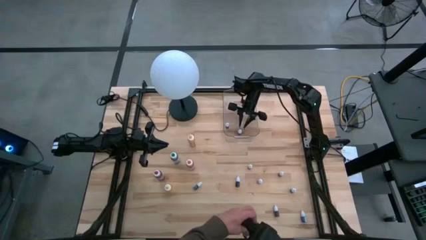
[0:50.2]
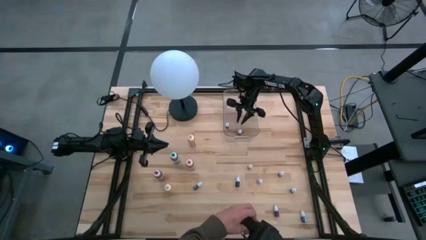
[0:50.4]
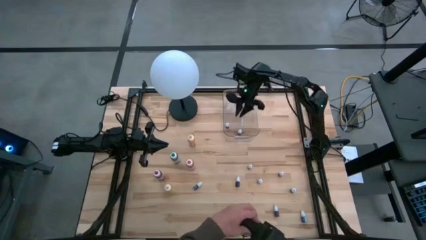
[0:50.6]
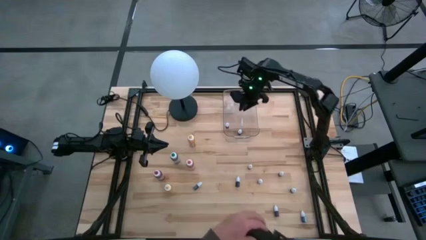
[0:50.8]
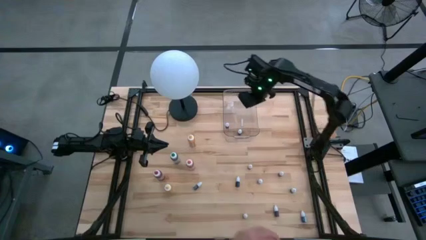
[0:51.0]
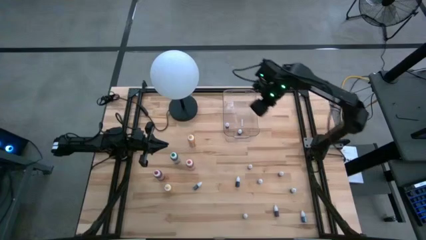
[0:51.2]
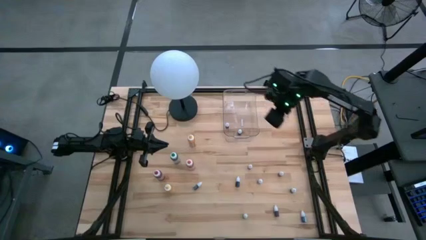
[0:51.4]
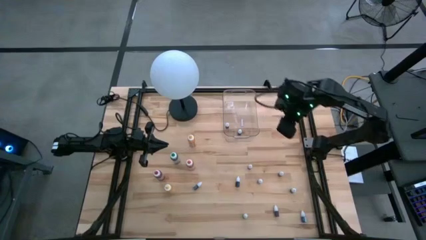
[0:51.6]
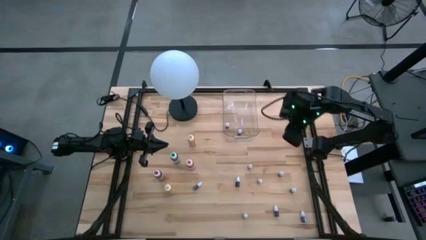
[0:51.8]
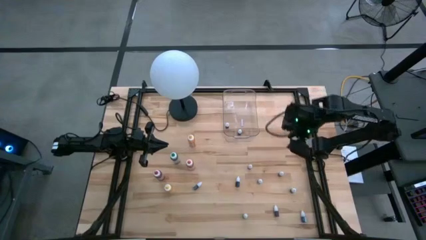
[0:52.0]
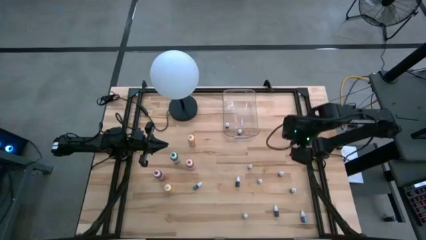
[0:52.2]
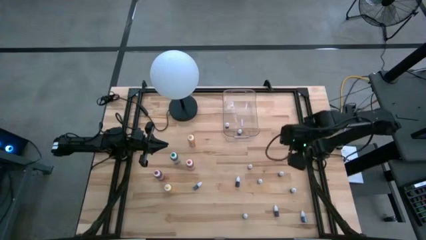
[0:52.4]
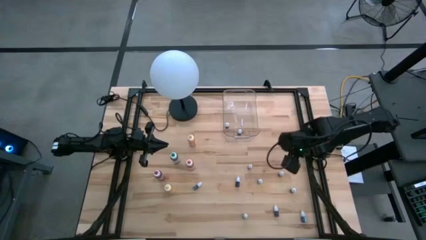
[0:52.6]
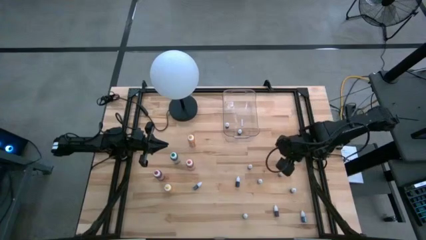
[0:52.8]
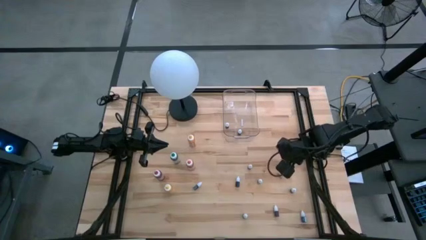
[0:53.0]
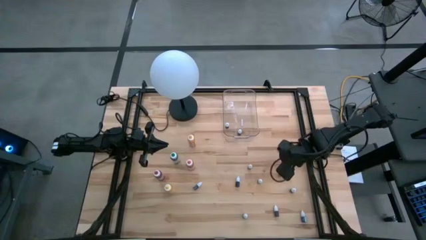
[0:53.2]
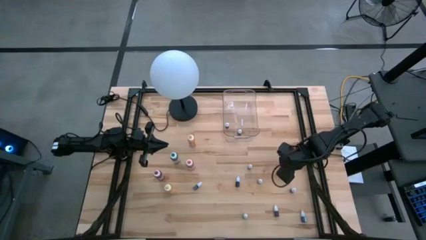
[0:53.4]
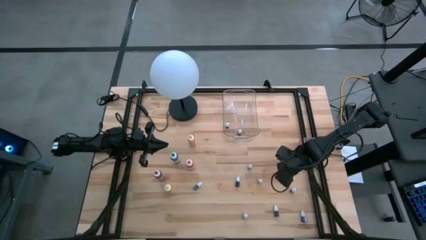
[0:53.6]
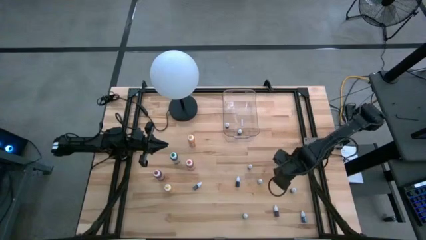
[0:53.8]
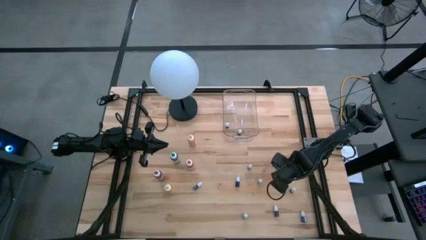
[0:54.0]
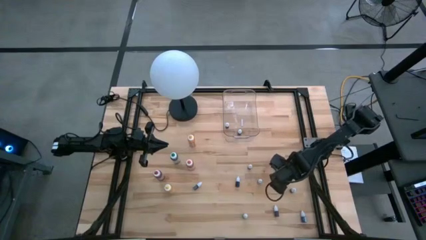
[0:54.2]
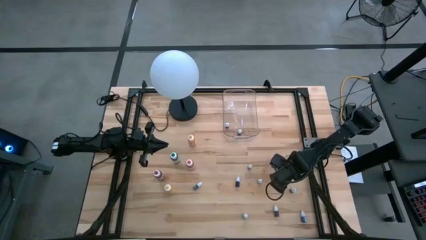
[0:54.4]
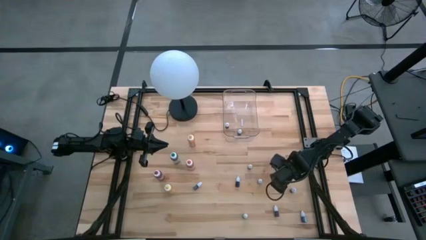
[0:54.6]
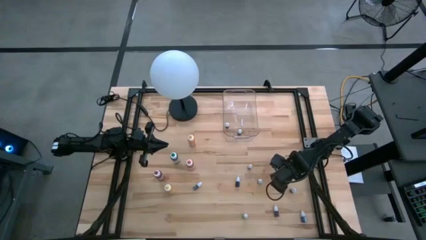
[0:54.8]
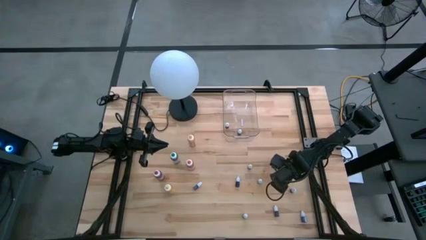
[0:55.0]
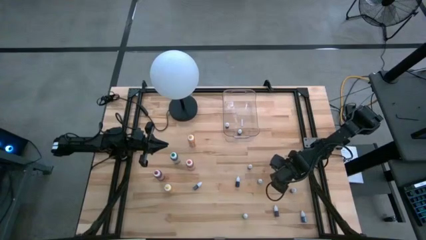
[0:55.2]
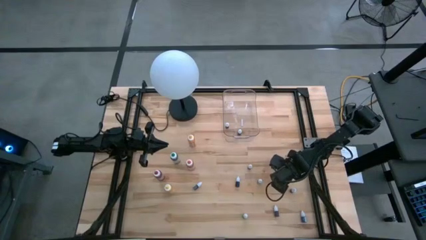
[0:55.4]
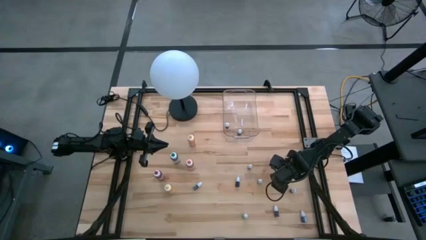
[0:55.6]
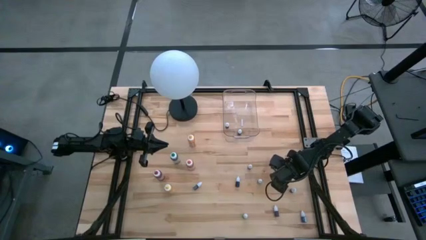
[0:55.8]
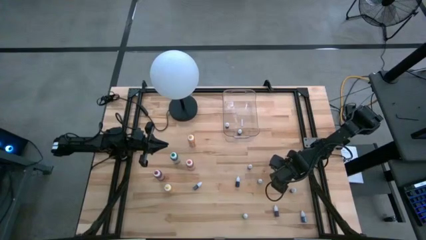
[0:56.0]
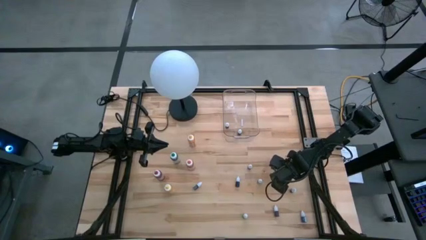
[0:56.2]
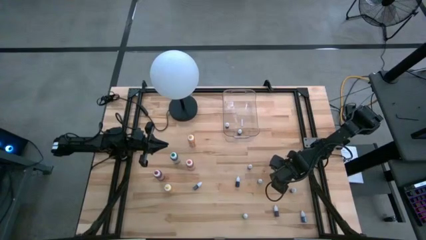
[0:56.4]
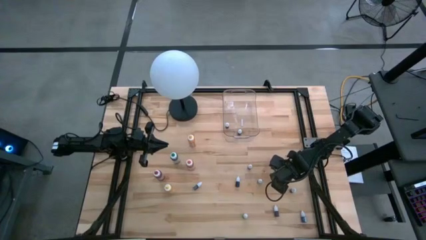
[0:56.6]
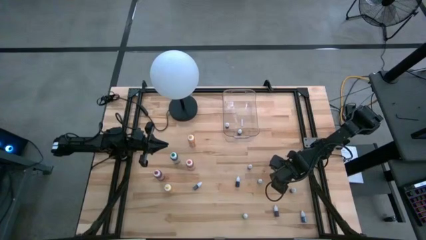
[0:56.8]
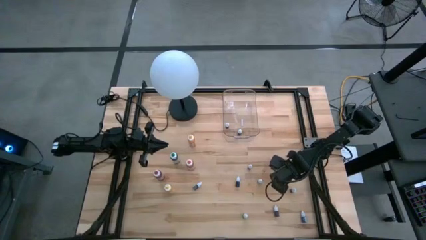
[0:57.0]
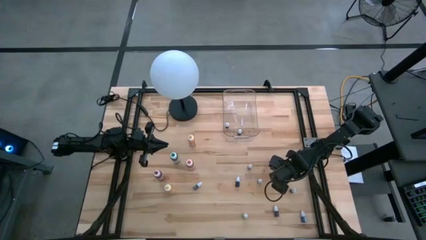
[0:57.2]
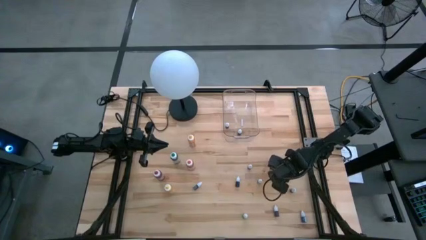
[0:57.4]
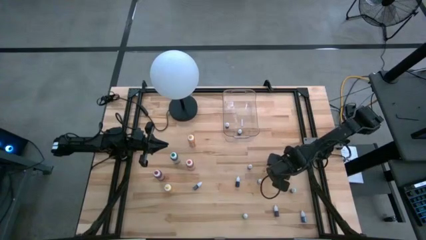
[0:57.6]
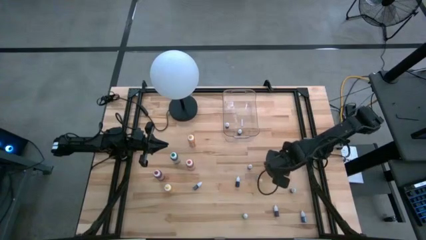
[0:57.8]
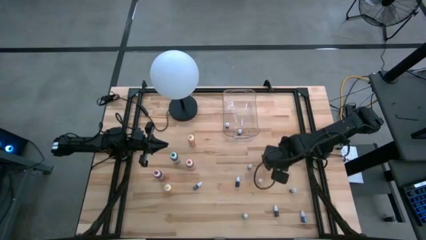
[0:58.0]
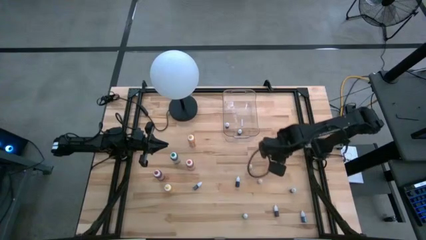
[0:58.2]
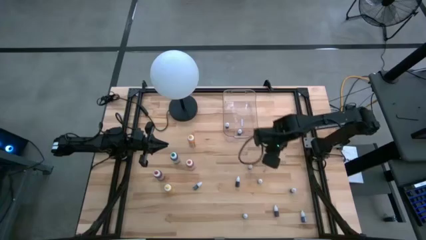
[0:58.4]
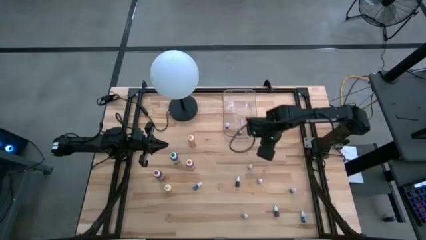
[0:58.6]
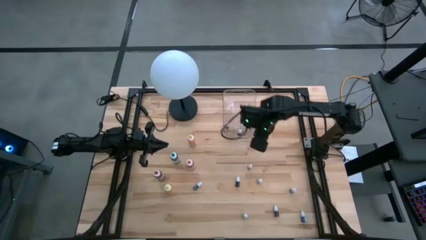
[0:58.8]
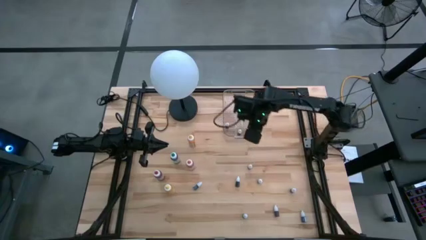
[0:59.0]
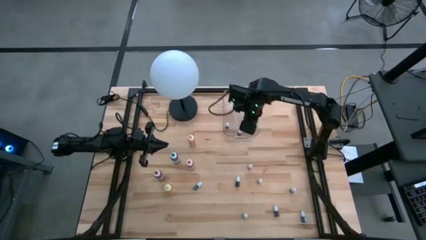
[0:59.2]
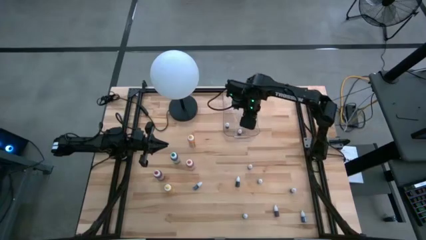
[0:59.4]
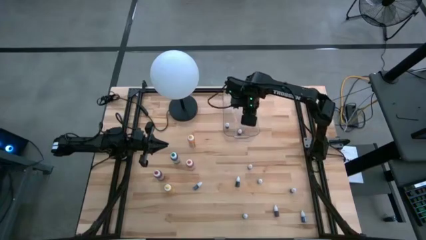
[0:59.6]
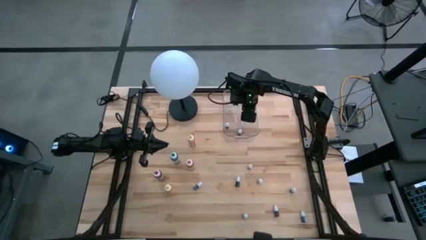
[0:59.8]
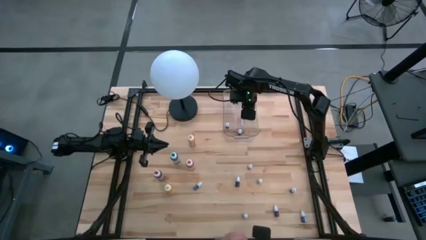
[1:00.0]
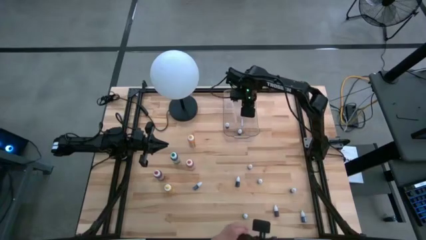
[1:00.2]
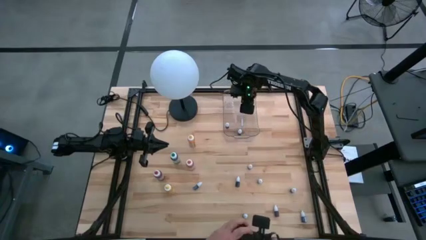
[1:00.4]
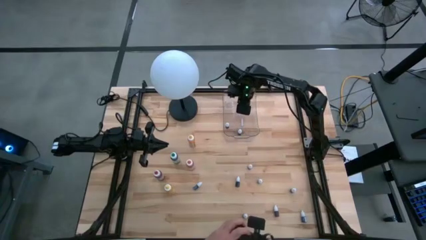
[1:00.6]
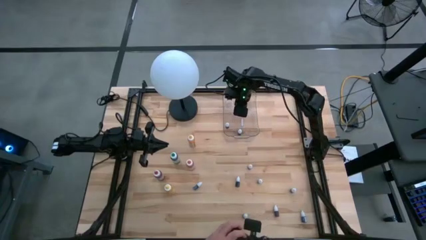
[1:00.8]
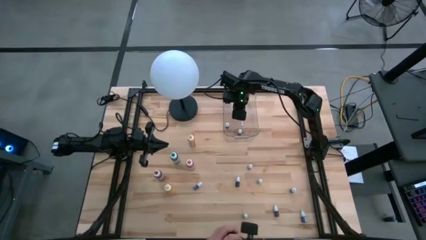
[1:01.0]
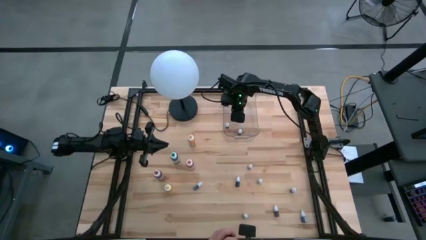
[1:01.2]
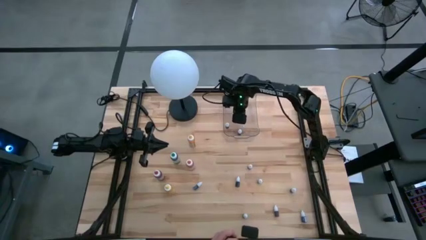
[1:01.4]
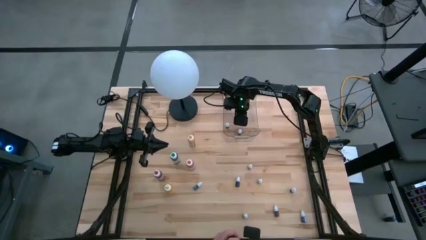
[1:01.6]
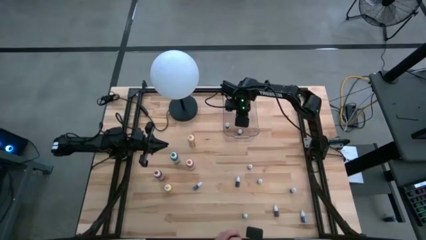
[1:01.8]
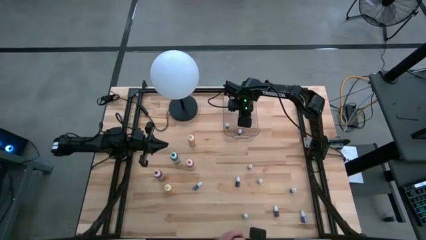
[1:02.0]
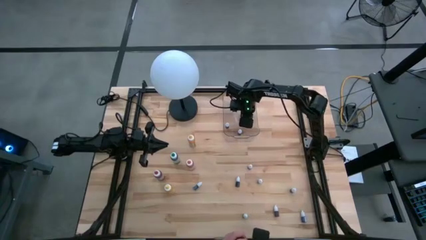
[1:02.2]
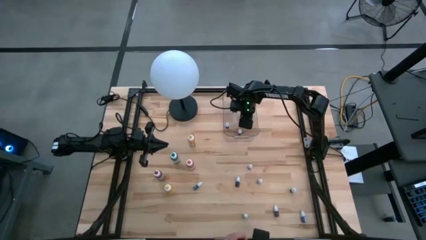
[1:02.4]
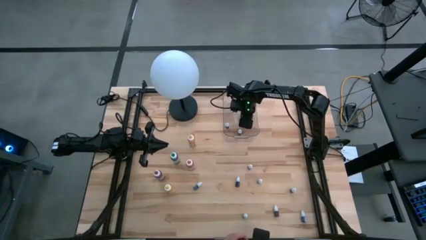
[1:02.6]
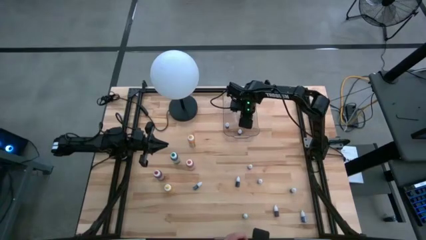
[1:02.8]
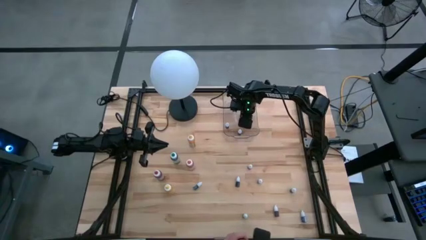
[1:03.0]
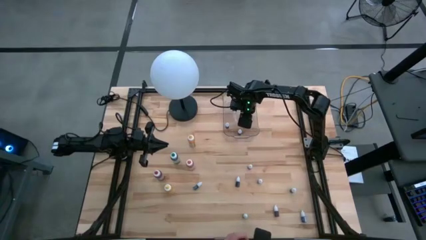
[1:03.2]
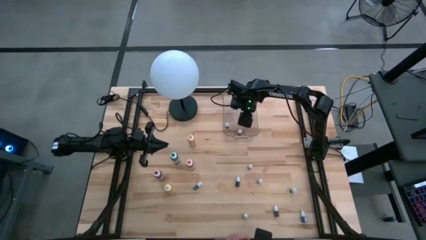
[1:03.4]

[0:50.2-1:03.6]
Task: Pick & Place food coloring
Put the small red food coloring bottle into the transparent bin

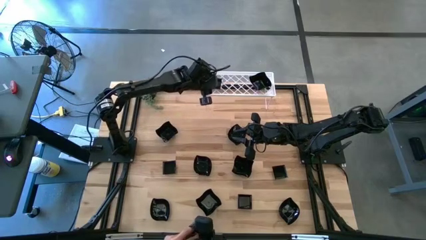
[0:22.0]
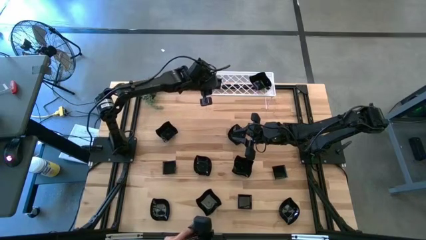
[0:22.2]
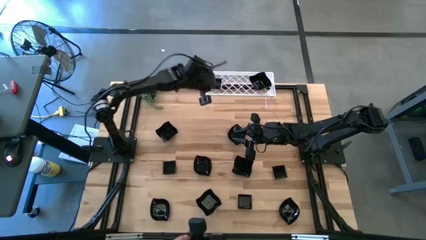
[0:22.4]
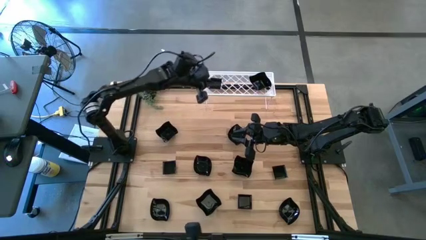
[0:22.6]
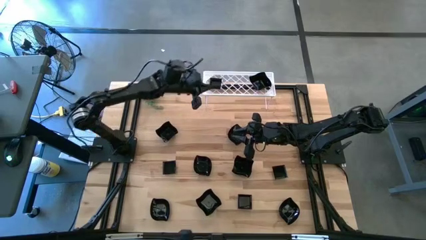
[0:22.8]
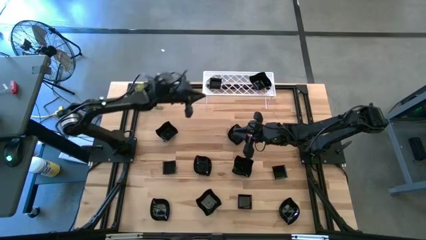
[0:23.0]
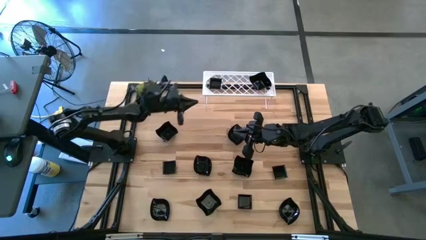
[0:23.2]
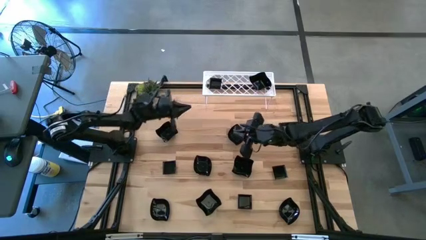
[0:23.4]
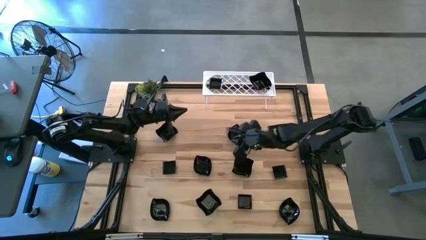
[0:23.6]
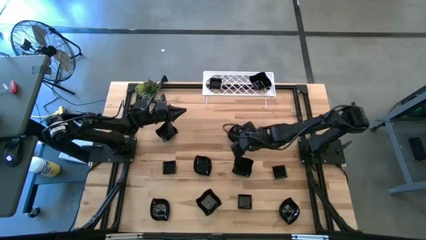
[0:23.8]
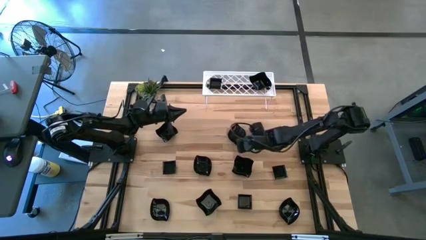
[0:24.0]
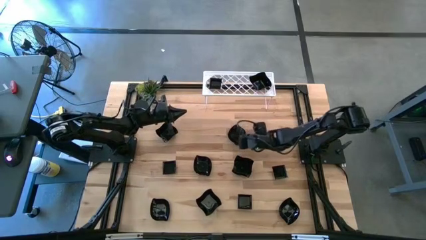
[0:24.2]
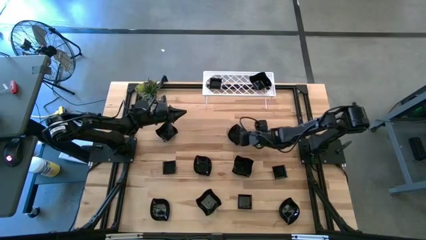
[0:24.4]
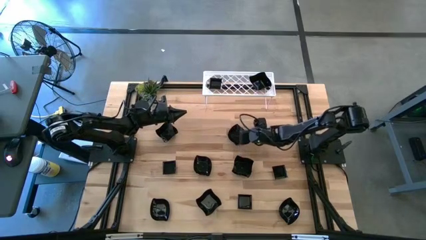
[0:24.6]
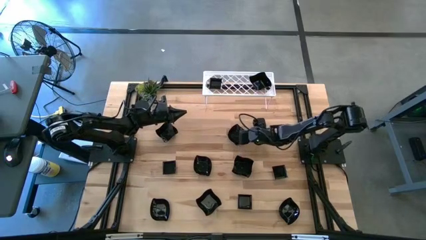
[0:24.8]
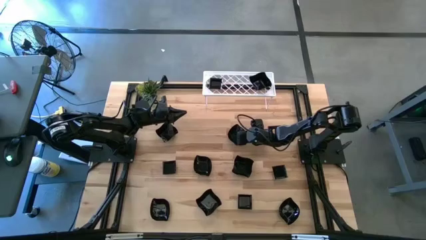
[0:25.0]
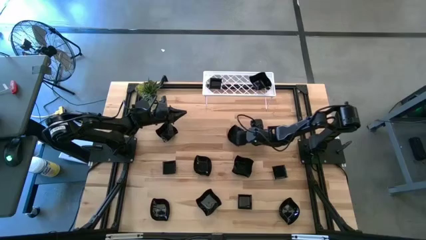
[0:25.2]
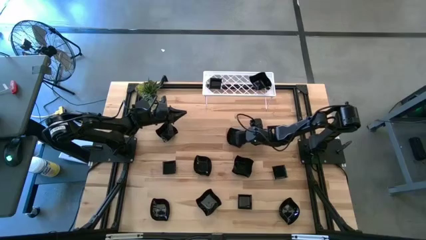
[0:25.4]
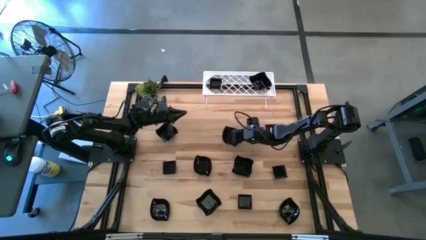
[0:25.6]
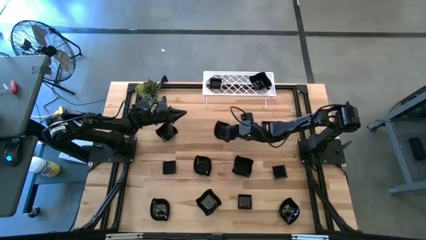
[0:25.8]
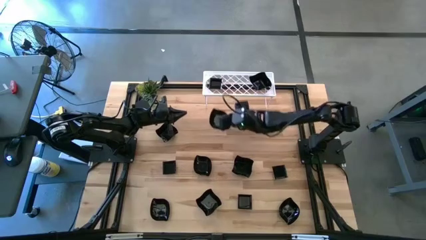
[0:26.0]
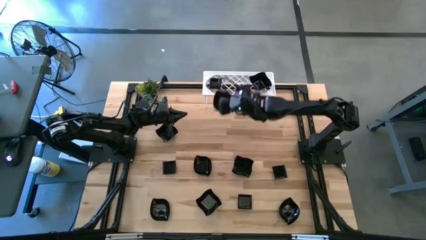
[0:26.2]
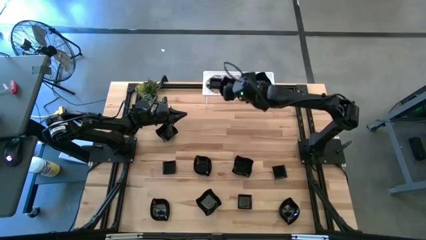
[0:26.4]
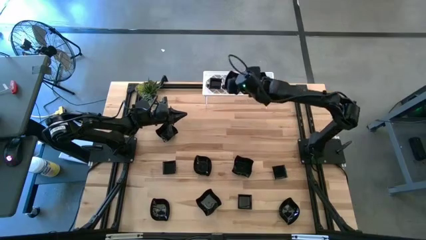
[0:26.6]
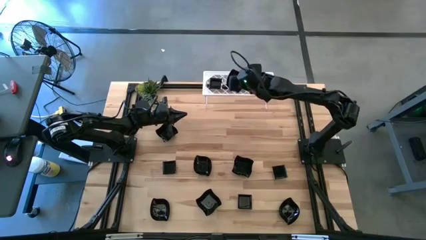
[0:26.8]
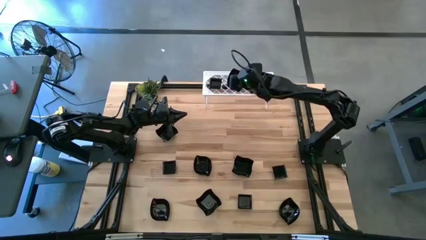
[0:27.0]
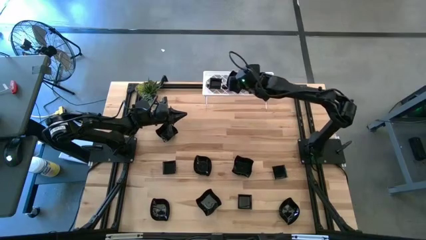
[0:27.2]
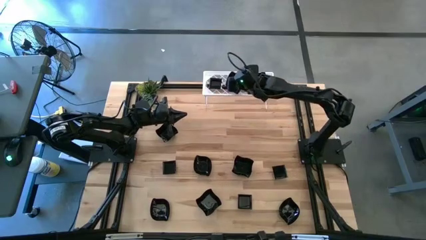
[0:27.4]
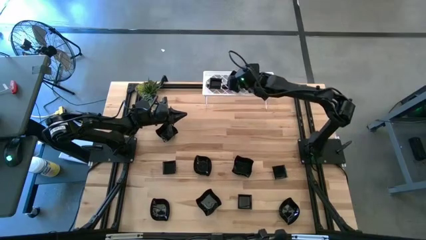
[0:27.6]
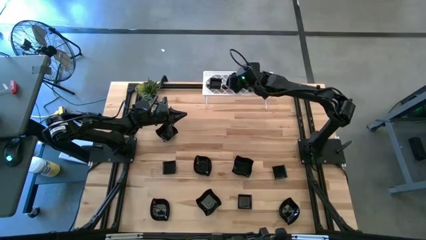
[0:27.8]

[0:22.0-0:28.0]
Task: Pick & Place Mini shaped plates
Put the leaf shaped plate on the shelf
